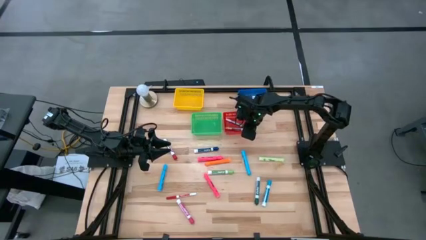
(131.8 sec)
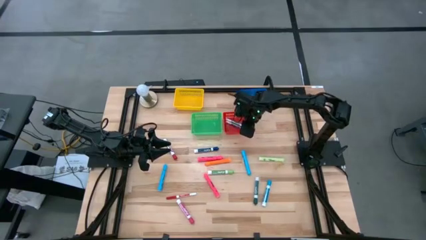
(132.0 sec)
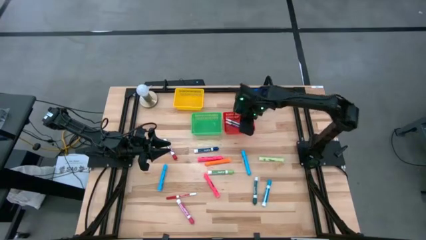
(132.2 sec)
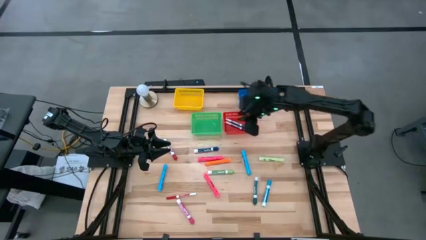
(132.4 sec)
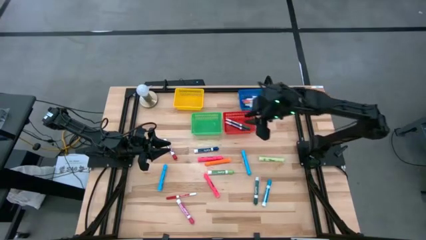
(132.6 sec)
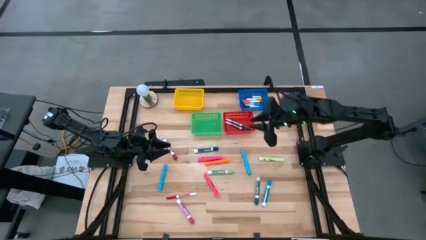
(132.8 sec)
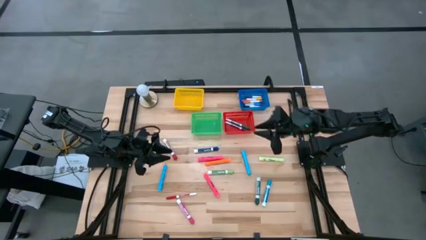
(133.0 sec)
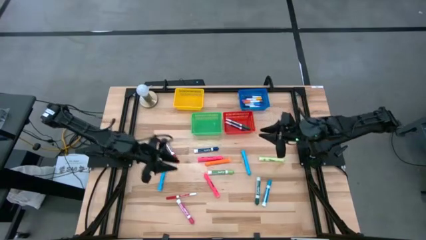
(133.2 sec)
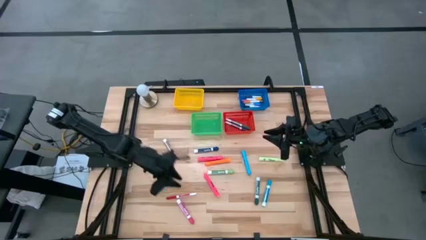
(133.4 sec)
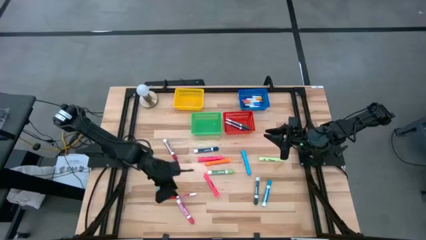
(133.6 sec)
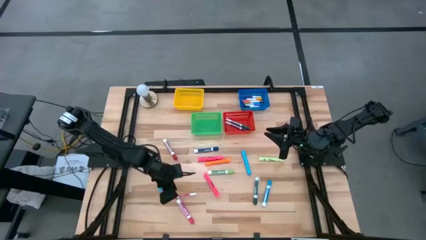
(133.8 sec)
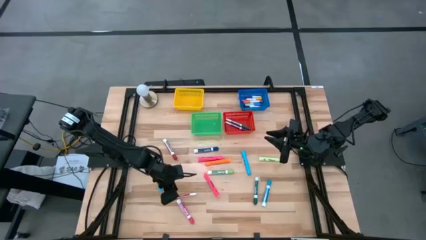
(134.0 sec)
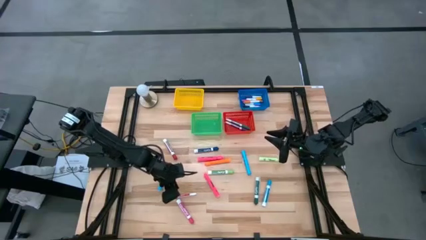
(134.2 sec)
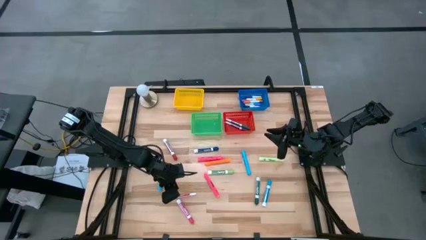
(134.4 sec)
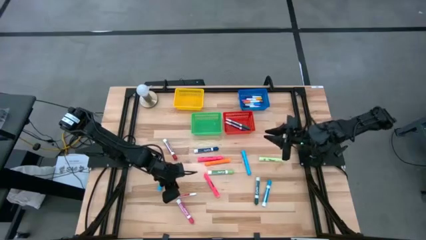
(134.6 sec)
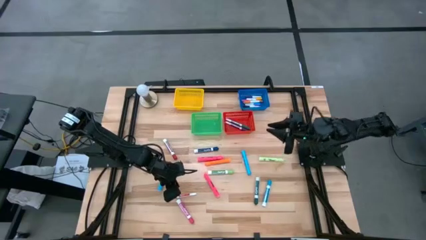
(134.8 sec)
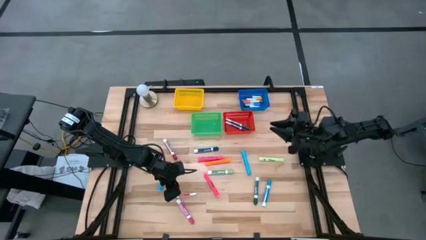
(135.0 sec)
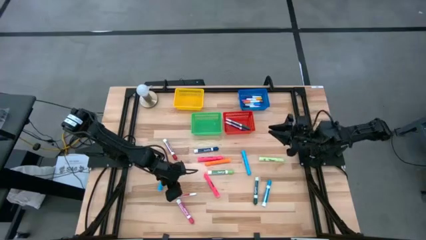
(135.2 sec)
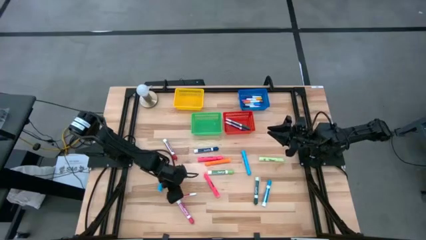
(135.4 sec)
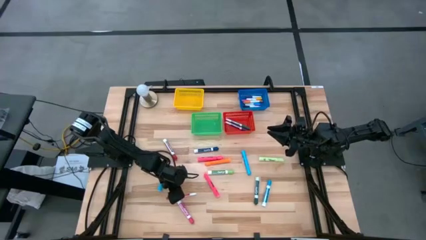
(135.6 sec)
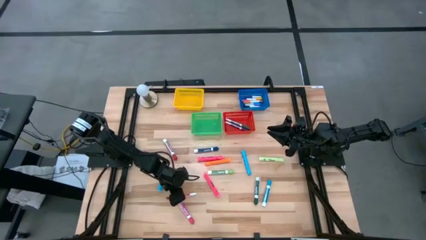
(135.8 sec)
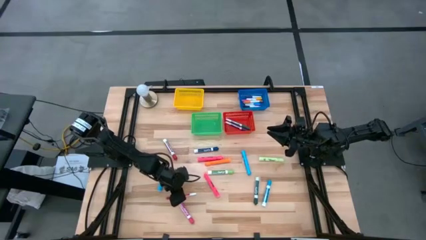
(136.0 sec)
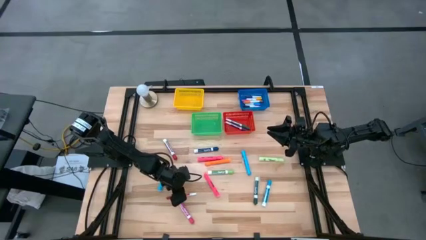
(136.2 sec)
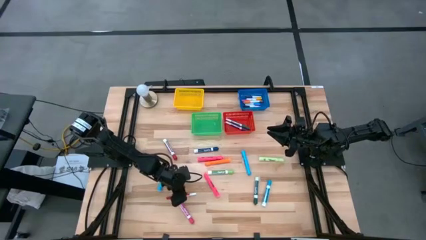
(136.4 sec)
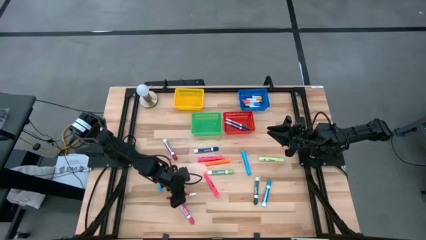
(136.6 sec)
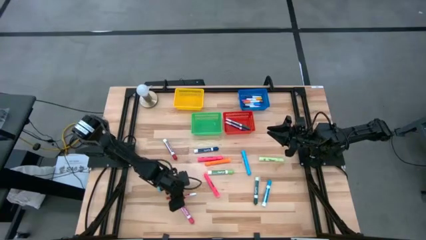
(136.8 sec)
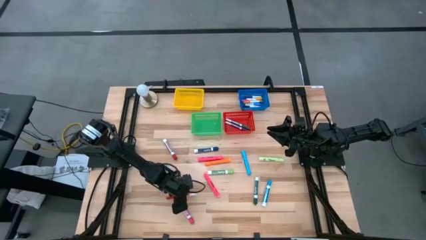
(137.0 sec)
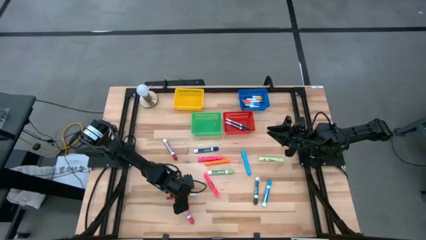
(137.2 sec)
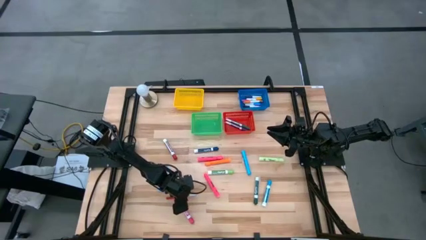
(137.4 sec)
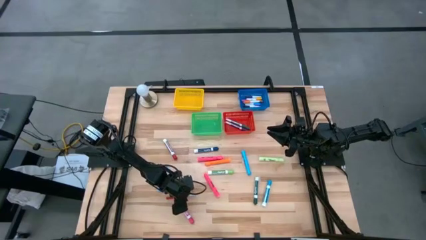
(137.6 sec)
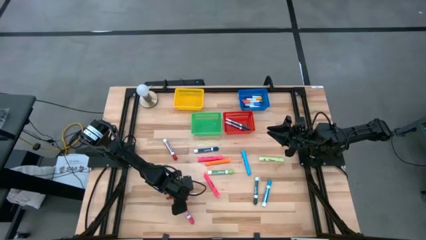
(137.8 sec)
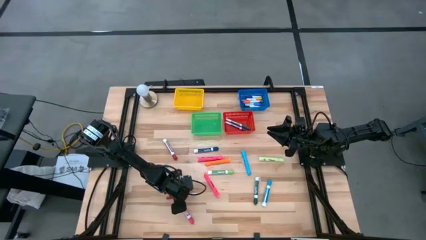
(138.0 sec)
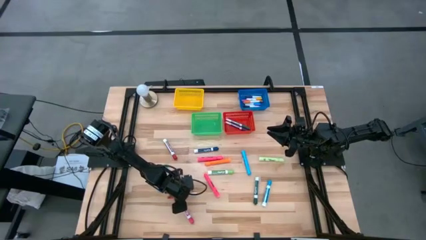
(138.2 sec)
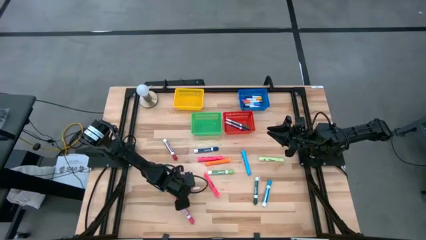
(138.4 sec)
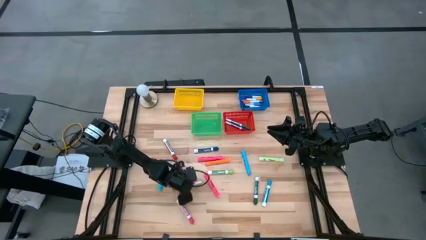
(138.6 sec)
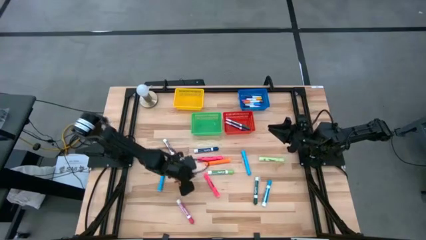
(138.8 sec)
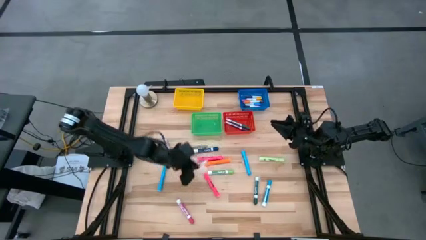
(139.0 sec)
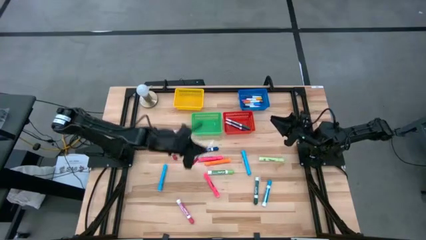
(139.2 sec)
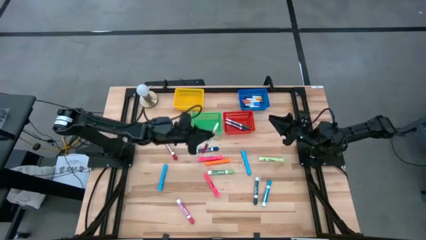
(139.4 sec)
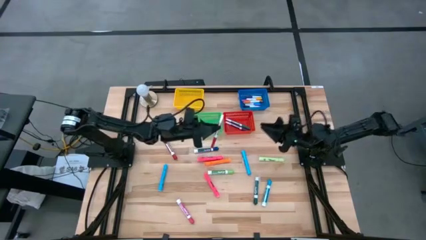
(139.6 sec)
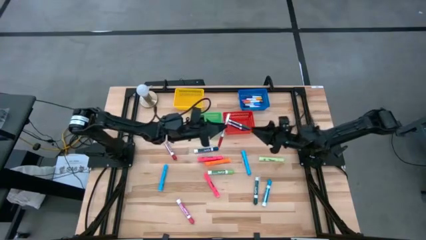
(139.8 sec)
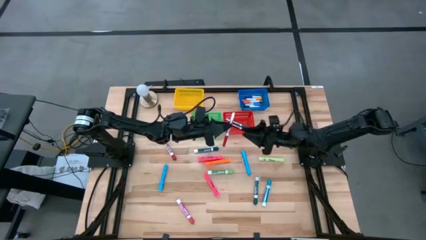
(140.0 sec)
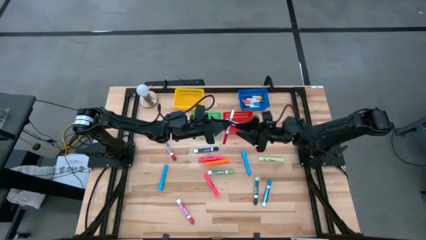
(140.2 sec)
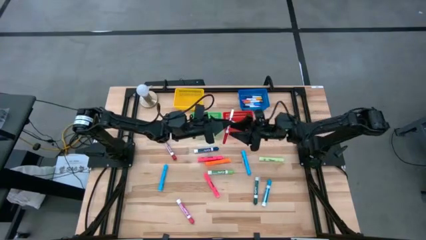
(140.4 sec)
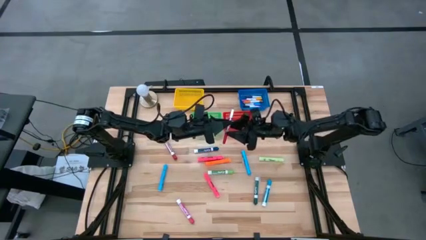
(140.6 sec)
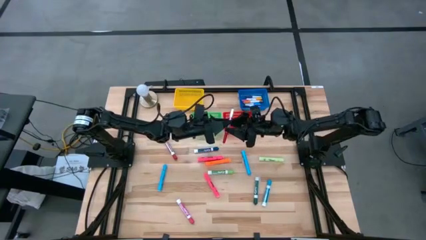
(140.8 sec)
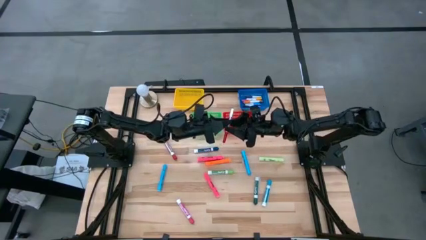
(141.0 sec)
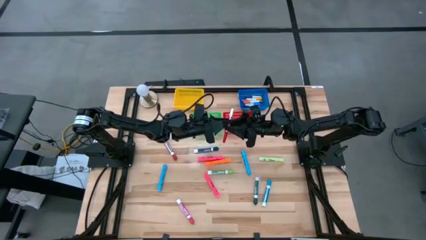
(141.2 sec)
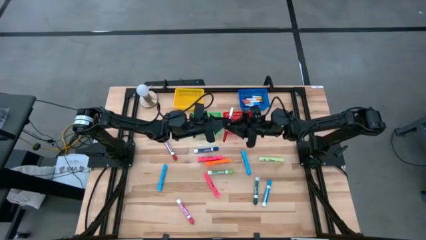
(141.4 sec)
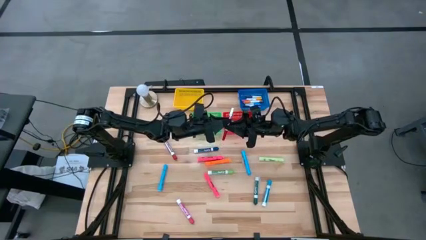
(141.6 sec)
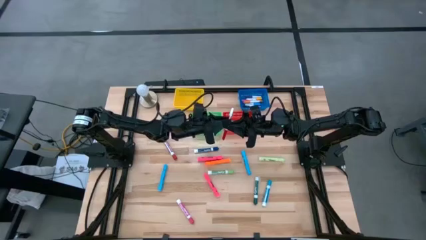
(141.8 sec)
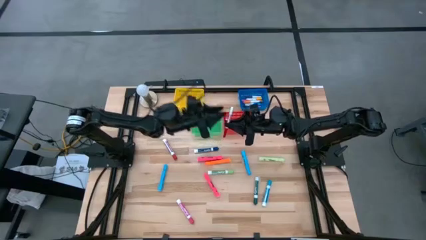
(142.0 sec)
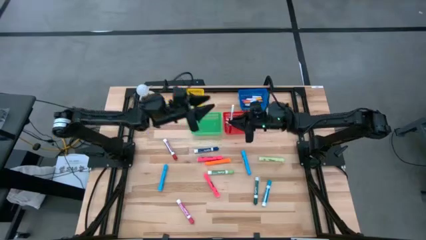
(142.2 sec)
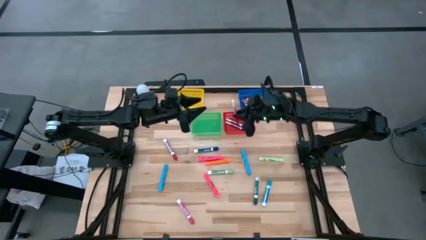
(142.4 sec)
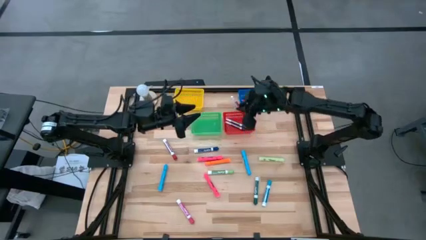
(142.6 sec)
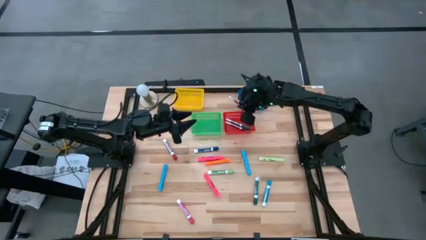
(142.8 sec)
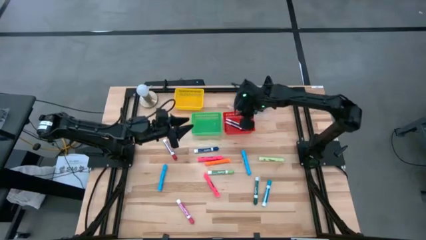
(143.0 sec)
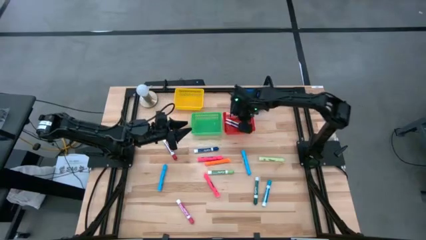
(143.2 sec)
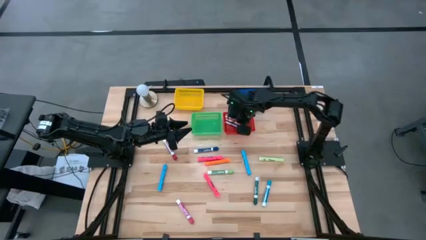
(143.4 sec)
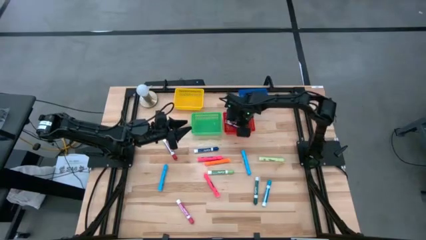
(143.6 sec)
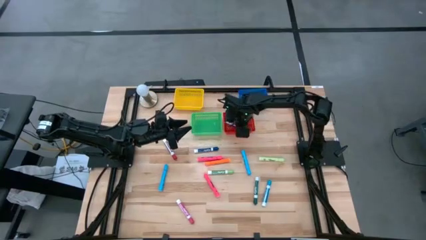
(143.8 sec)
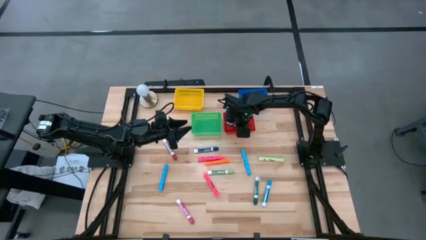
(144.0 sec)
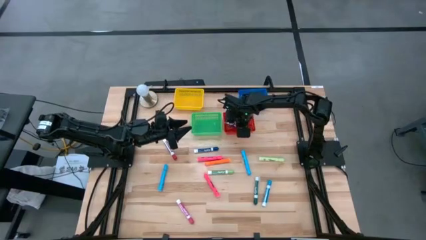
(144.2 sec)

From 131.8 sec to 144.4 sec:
Task: Pick & Place Markers
Put the red marker into the red bin

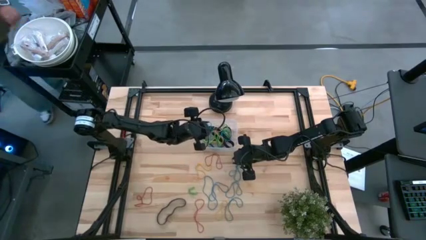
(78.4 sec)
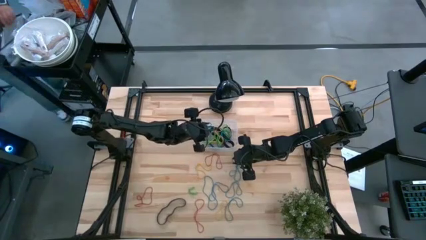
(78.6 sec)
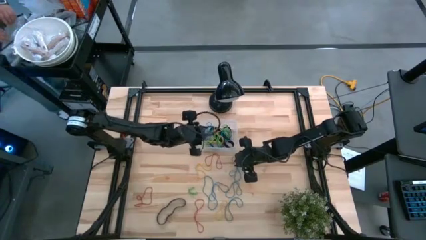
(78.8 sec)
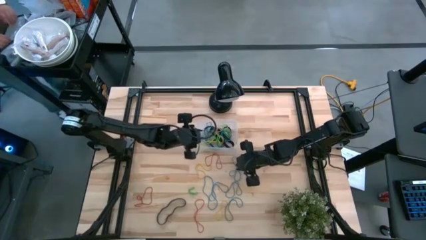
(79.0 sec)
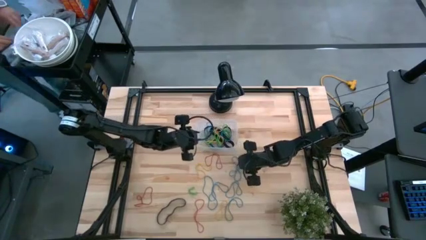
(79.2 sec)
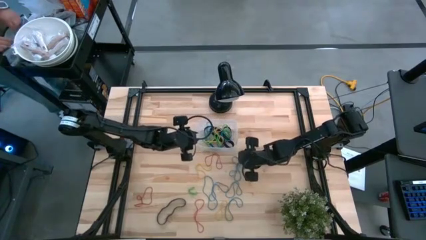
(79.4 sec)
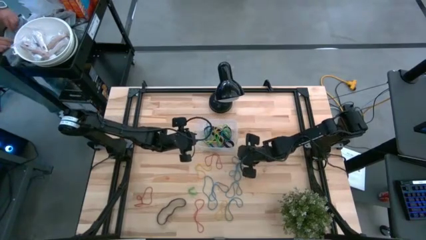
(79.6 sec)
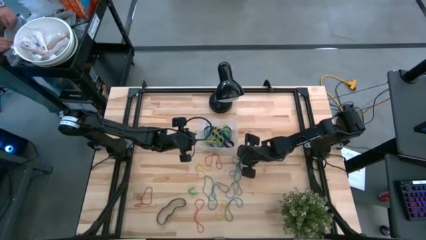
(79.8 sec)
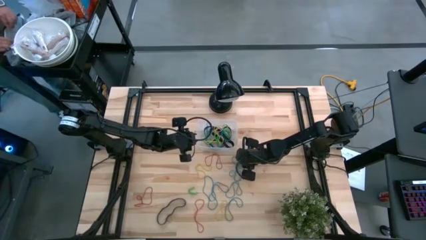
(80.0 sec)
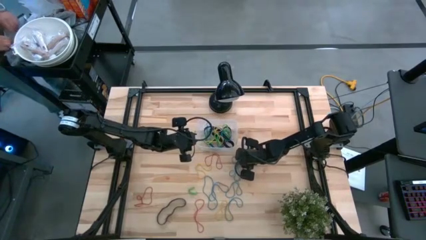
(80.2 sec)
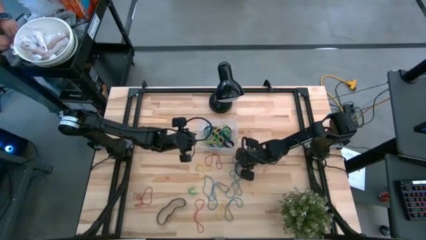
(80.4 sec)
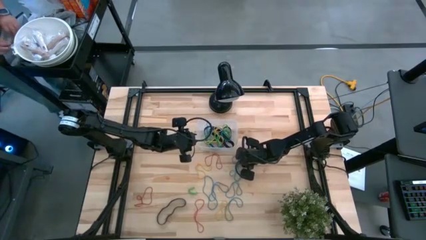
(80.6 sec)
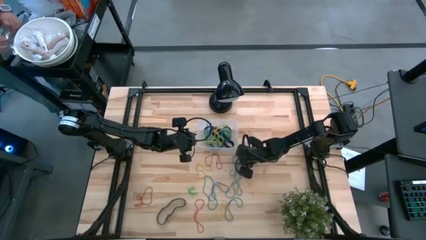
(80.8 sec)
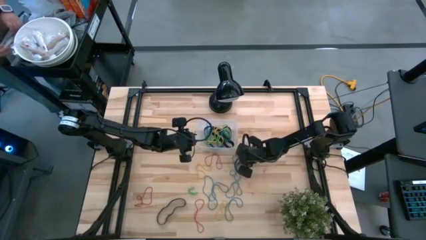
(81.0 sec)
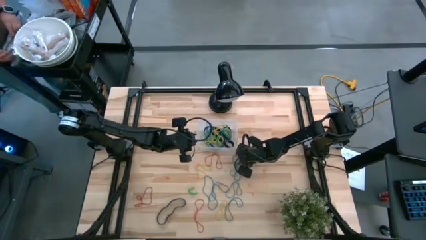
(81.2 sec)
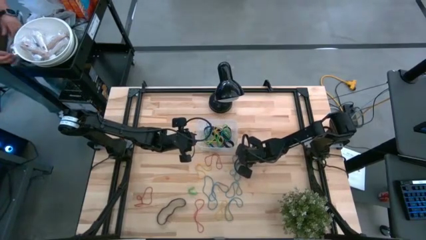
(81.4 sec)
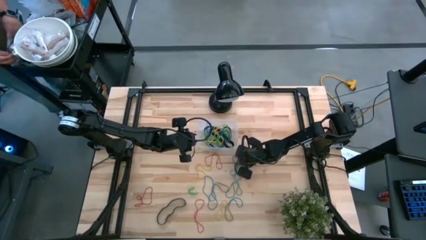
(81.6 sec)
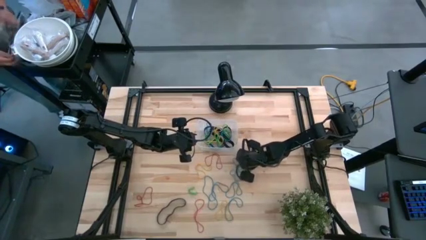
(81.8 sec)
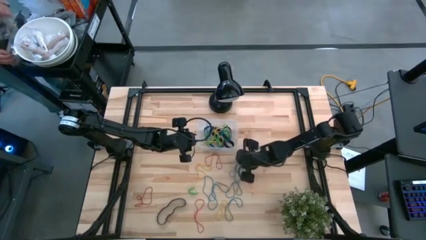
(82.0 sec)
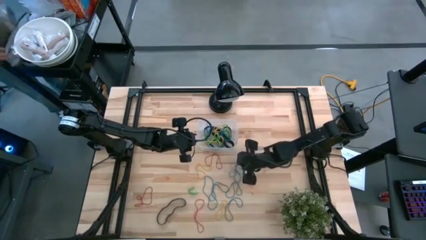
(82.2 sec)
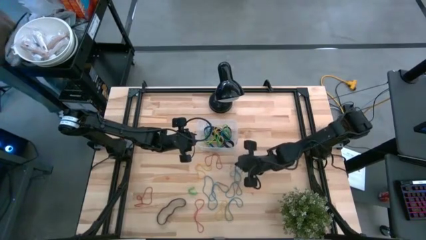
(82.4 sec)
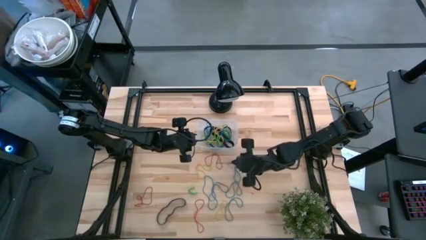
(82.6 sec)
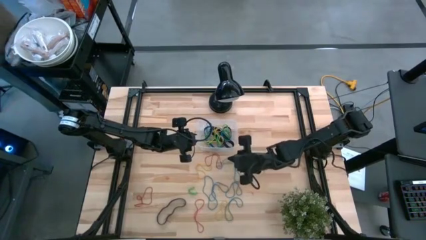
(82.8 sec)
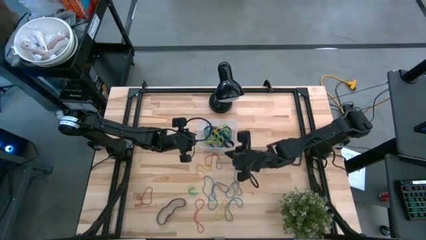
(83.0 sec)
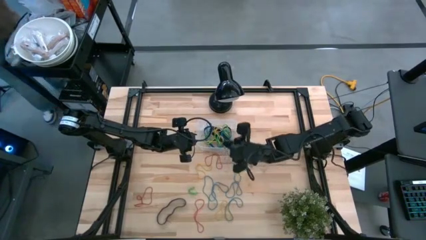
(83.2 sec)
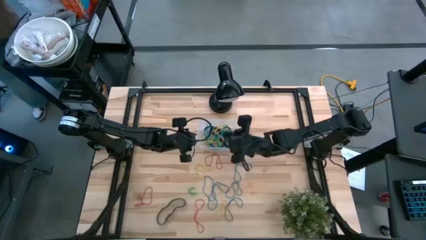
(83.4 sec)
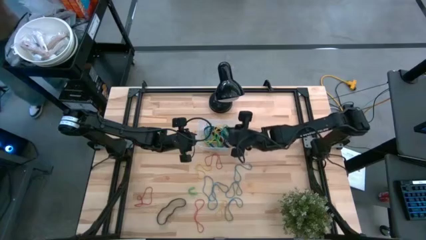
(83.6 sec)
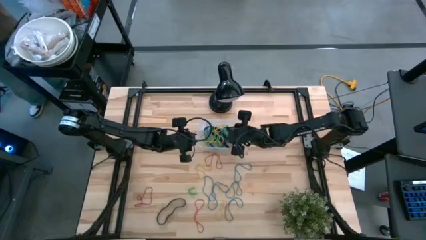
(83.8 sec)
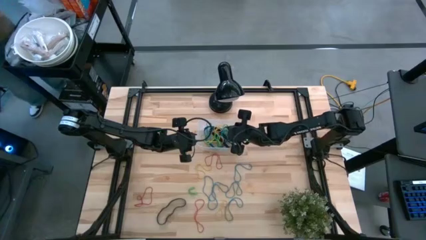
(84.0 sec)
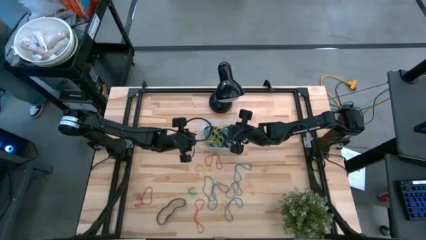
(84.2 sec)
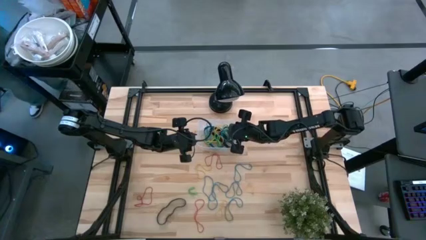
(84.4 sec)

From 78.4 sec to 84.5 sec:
Task: Pick and place rubber bands into bin
Put the blue rubber band into the transparent bin
